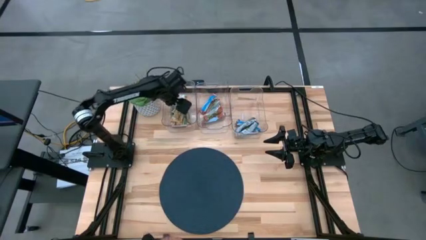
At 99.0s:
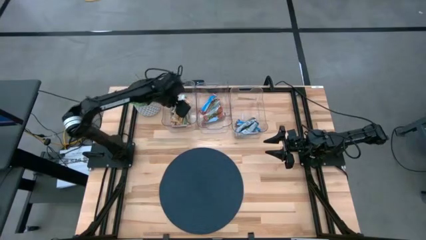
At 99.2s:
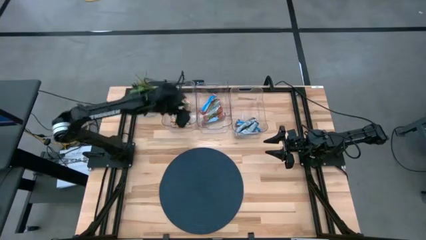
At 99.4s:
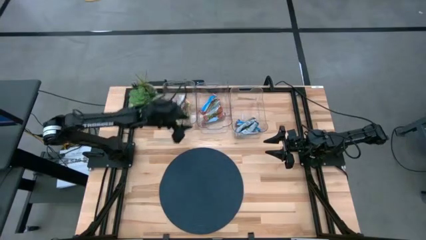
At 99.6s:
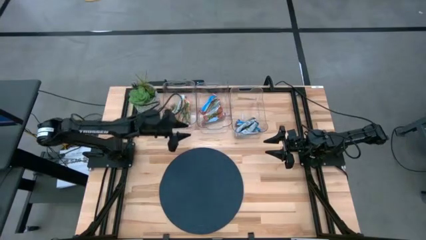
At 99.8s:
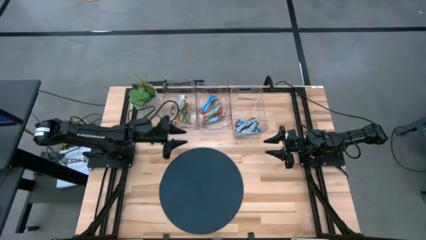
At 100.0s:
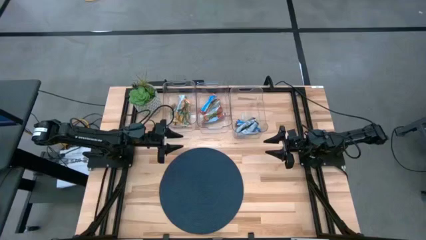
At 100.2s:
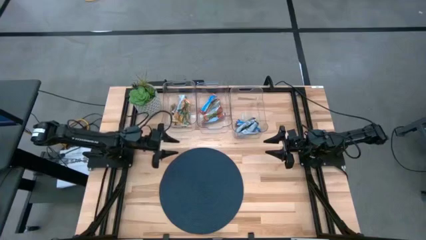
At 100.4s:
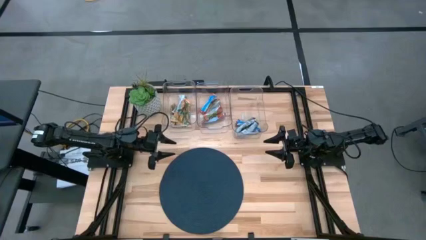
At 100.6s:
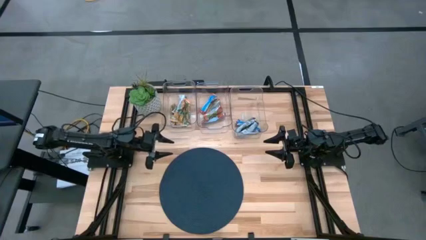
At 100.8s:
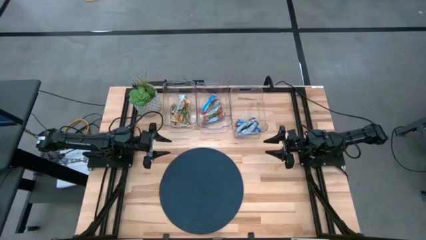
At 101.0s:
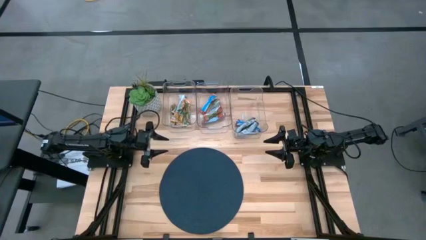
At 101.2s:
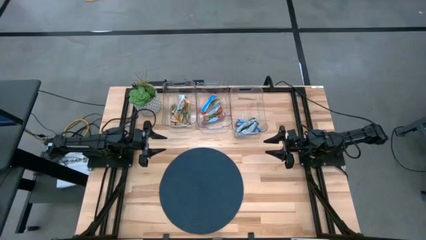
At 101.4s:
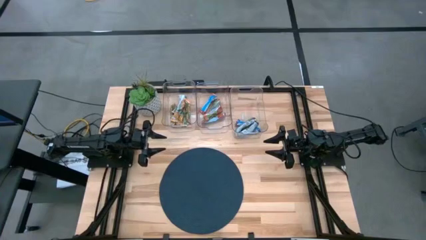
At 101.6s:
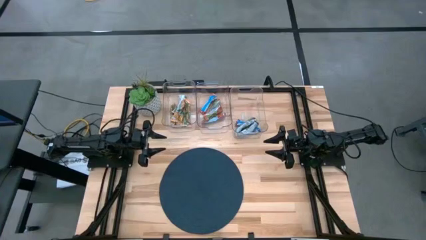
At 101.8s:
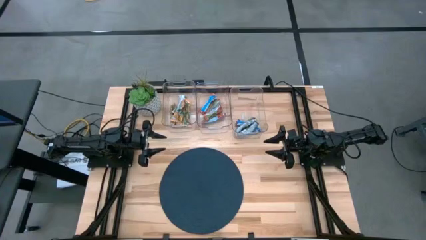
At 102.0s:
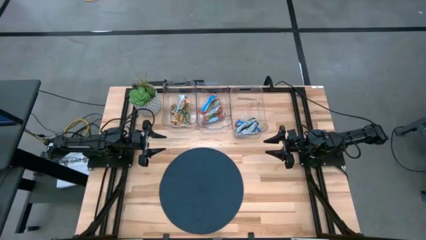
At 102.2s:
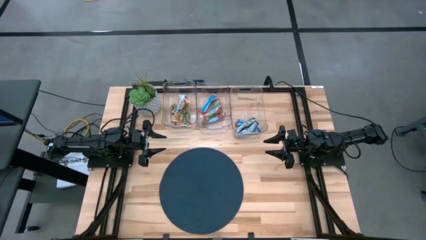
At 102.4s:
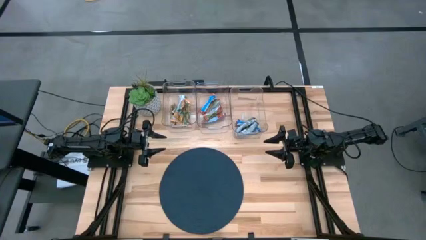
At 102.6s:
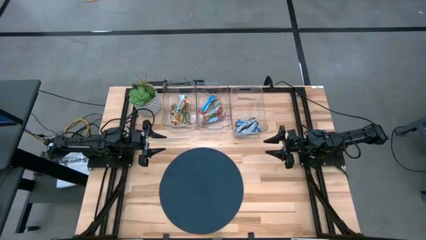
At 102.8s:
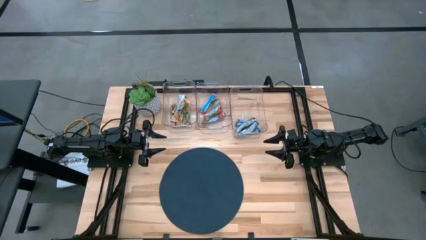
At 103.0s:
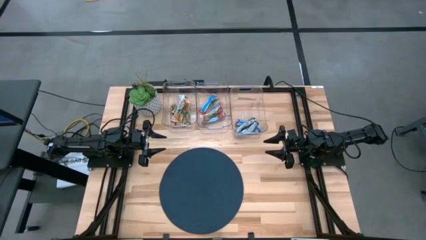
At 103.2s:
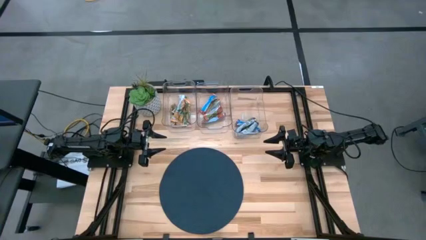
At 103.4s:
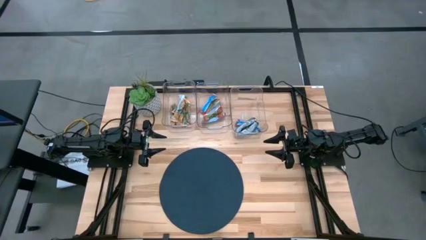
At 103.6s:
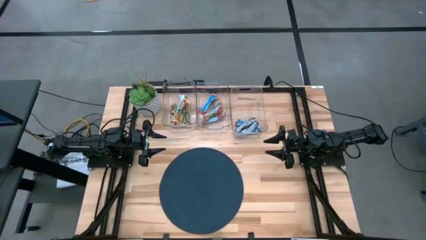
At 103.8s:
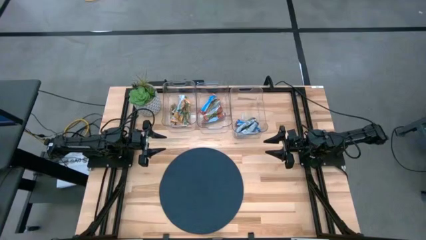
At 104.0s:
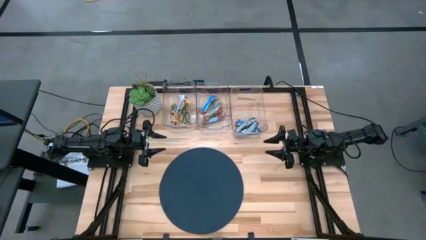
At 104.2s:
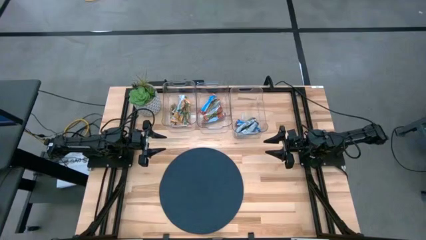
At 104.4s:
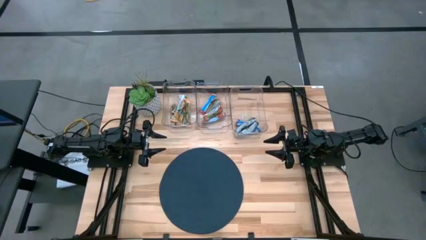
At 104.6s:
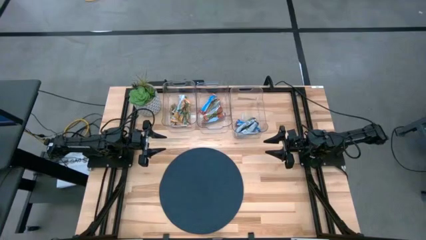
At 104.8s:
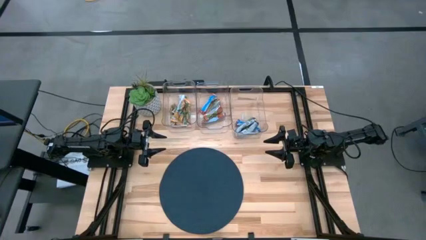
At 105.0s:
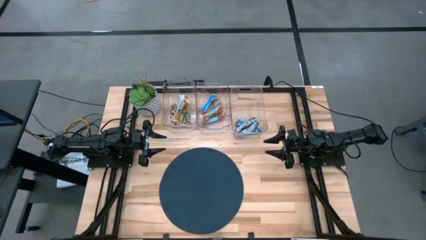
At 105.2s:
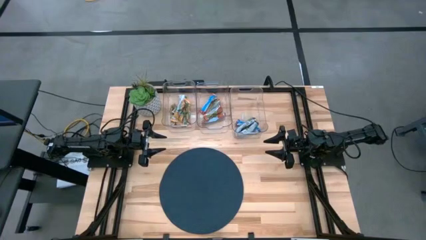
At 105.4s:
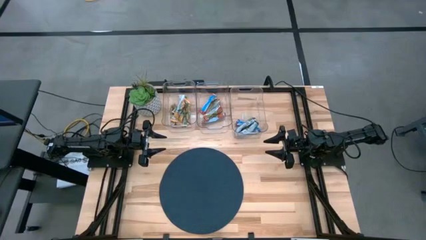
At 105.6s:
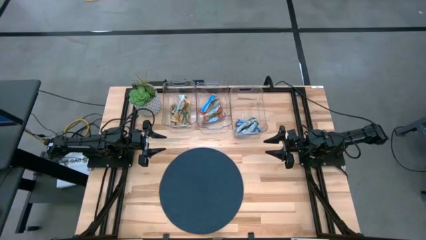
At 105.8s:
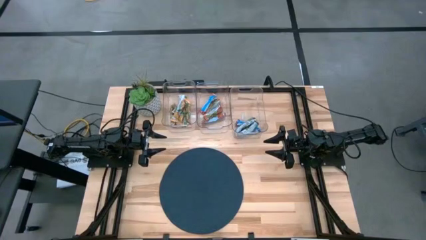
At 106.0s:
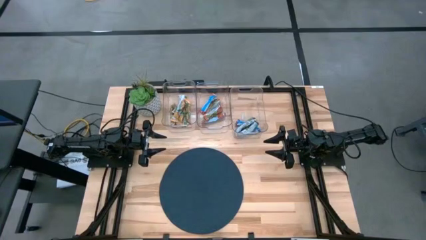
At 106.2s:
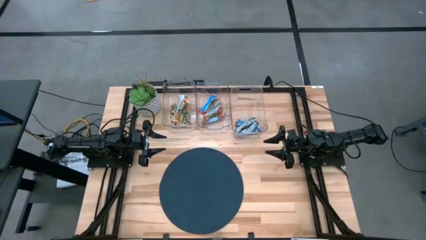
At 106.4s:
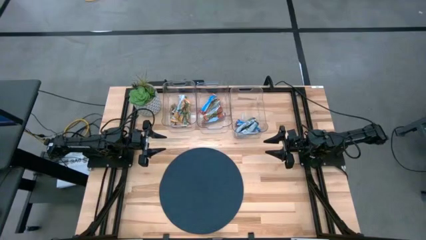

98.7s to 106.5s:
Task: Pick and place Granola Bars by type
Return to Home Position

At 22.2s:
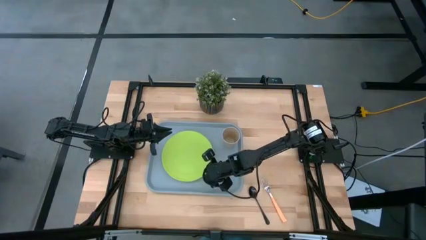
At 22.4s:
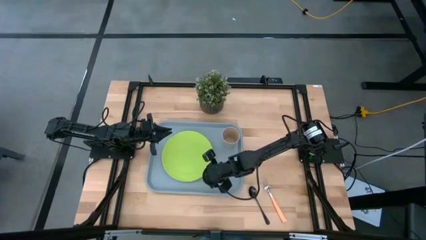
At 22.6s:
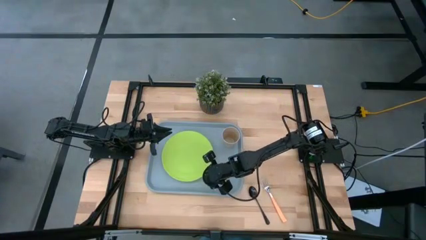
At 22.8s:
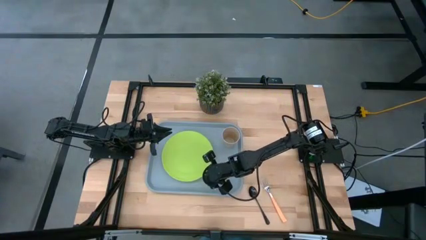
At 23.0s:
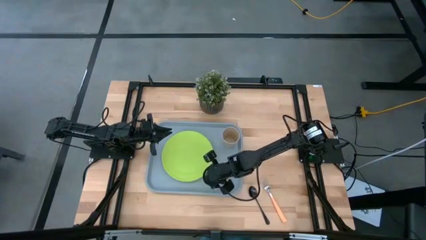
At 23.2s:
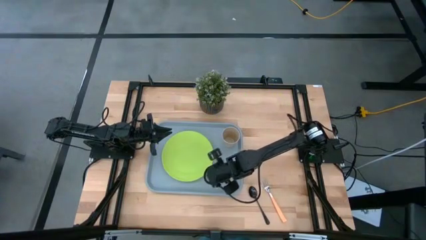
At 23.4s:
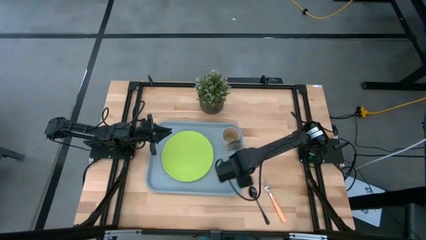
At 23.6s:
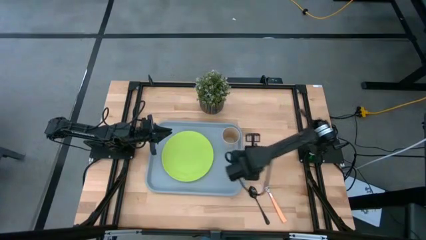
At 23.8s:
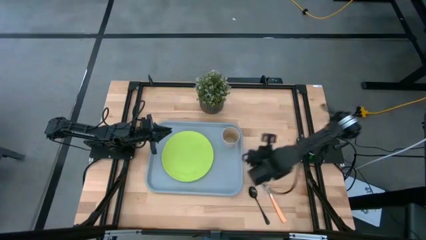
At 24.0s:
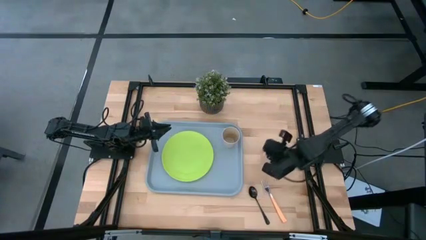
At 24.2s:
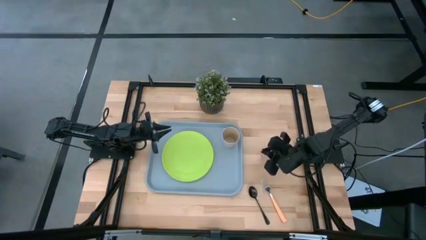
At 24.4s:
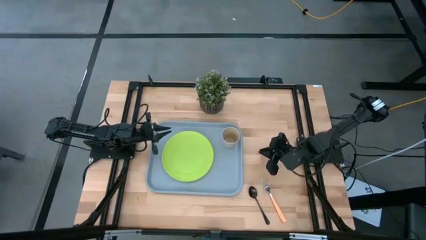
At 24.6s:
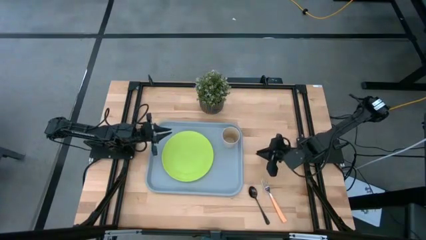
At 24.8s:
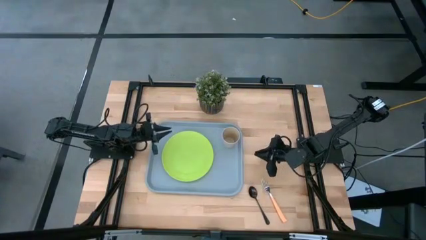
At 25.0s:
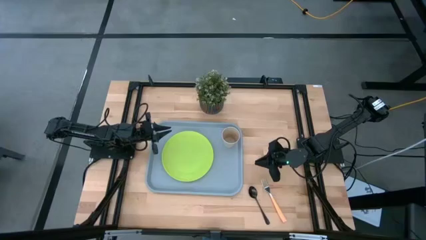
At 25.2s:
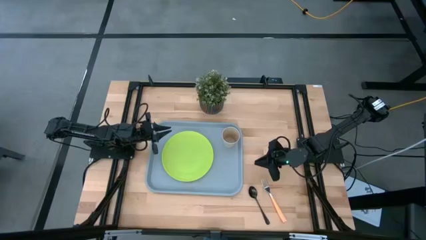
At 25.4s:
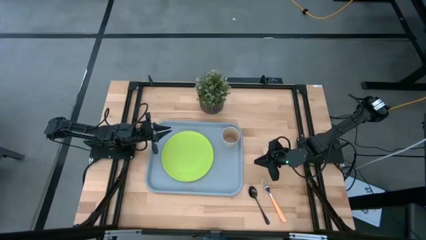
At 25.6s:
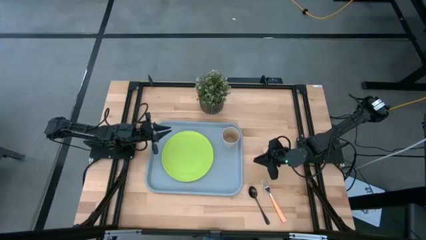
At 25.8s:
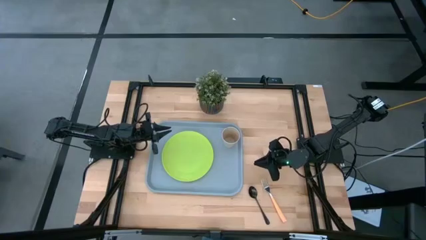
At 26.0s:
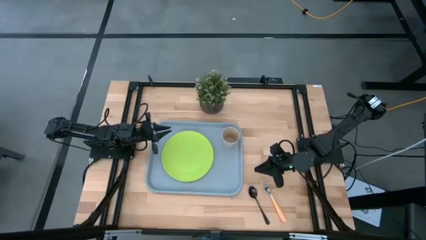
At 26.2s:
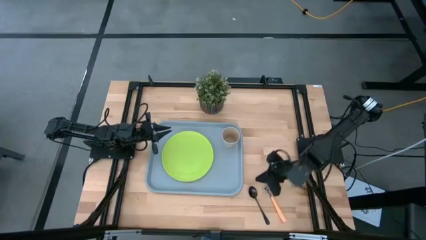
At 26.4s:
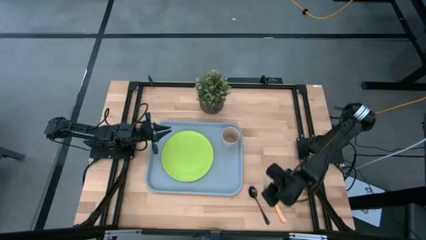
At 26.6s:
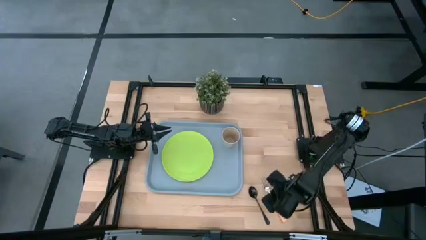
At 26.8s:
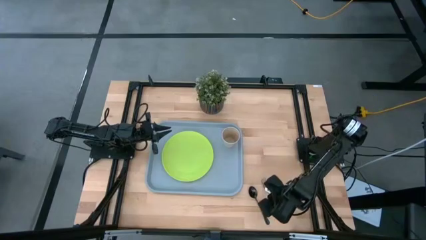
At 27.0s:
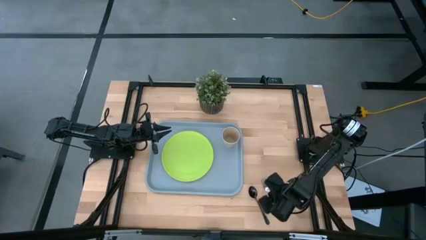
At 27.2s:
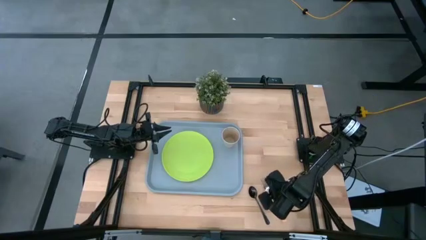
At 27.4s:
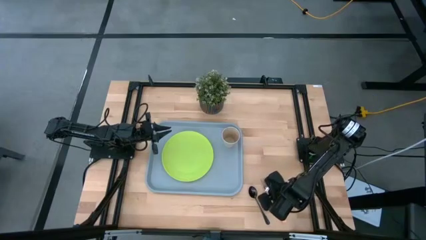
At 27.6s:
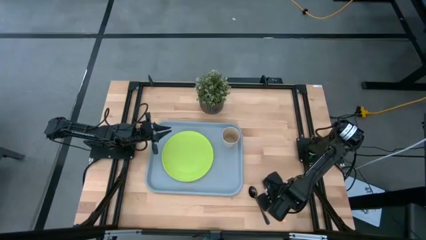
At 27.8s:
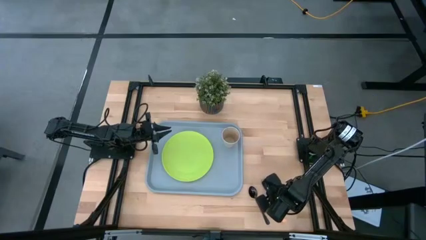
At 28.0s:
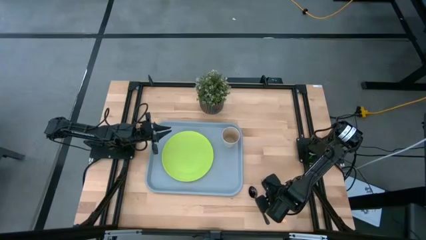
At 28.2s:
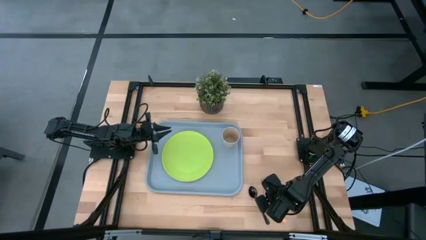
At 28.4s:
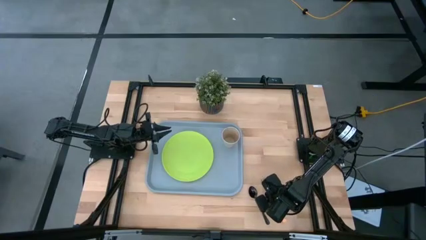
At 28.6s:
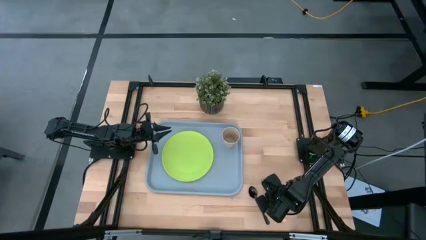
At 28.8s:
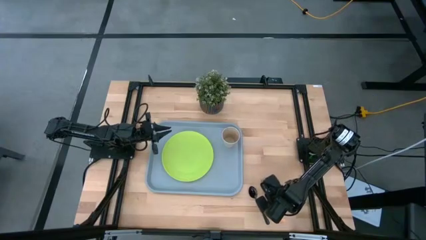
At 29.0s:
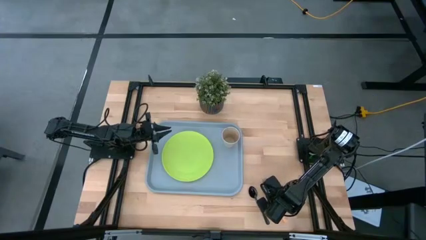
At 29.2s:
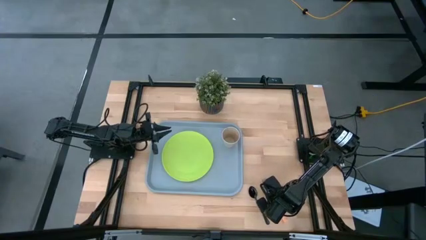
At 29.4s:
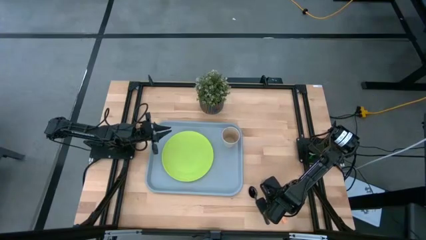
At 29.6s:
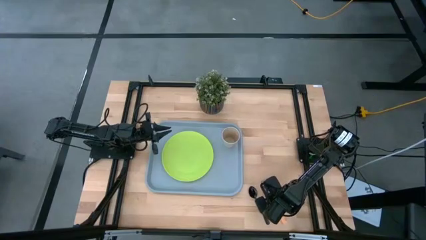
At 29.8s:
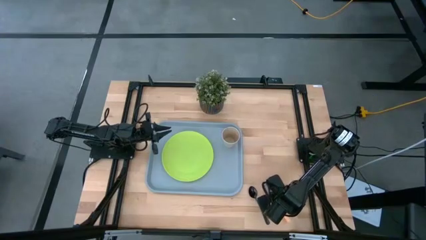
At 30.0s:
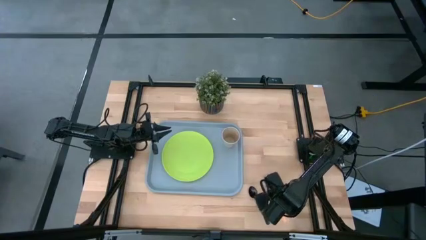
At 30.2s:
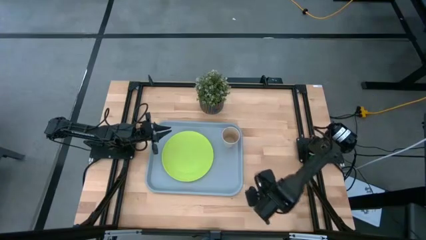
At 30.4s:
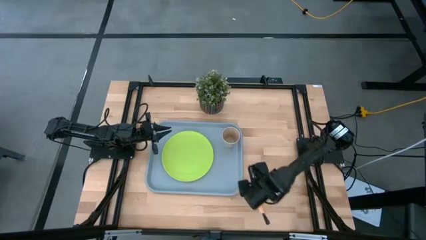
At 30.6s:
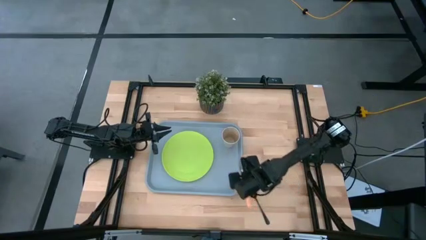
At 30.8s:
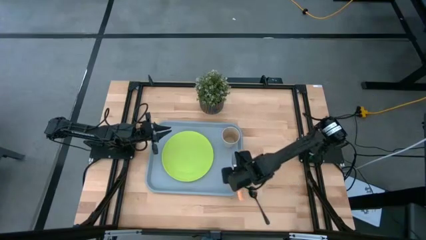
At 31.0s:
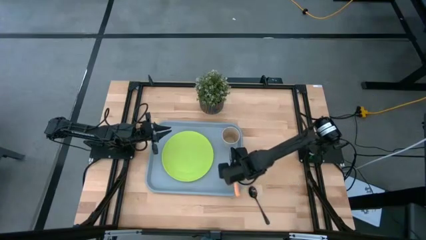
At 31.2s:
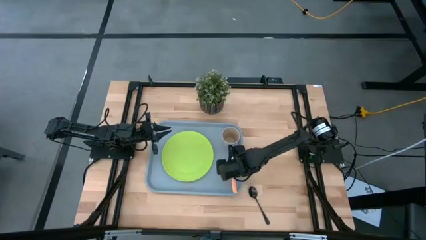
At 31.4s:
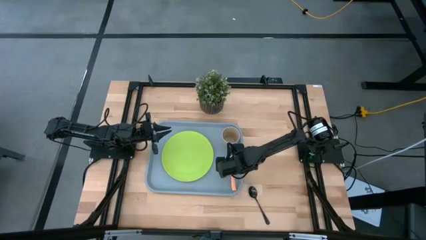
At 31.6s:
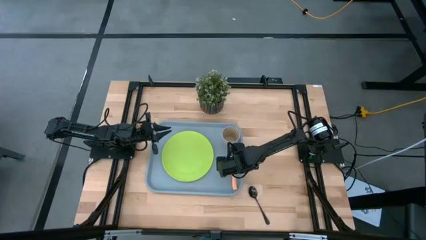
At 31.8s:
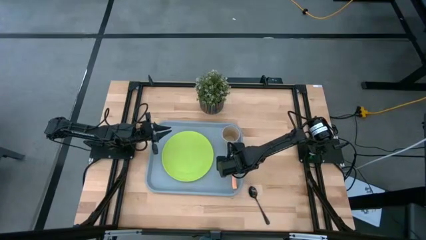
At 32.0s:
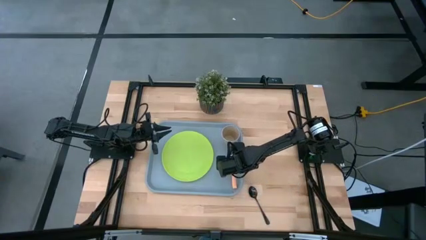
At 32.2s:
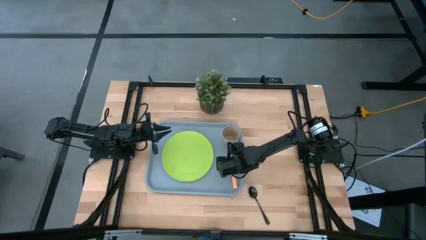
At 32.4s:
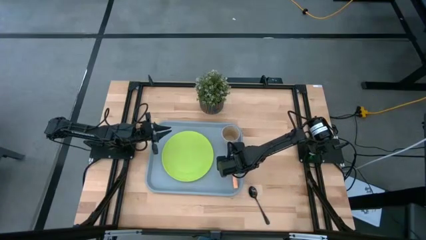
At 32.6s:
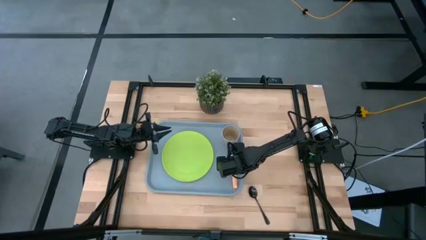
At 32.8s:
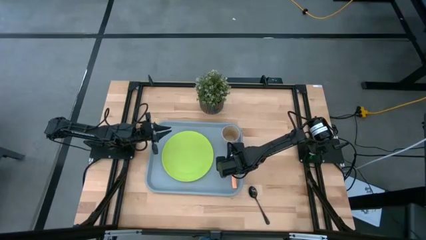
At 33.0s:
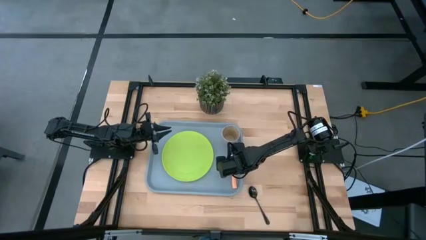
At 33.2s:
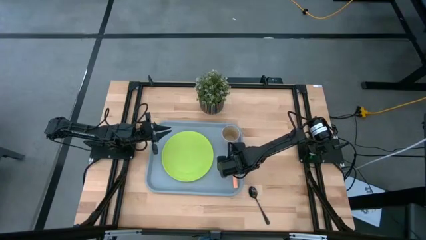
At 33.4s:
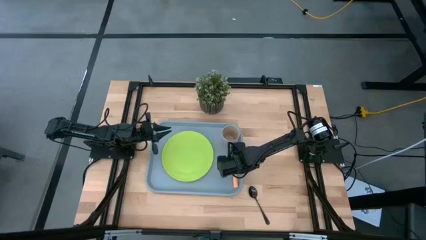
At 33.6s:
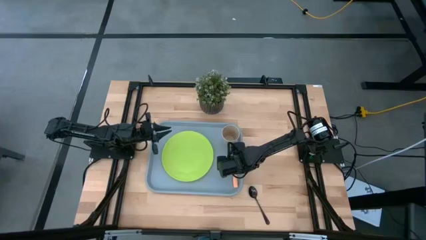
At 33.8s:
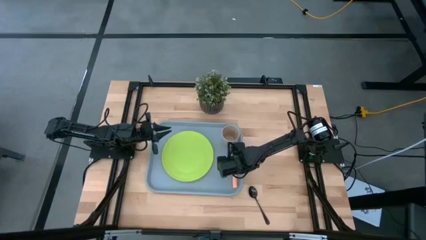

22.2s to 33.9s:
Task: Pick and place plate/cup/fork/spoon on tray
Put the orange fork on the gray serving tray to the right of the green plate
